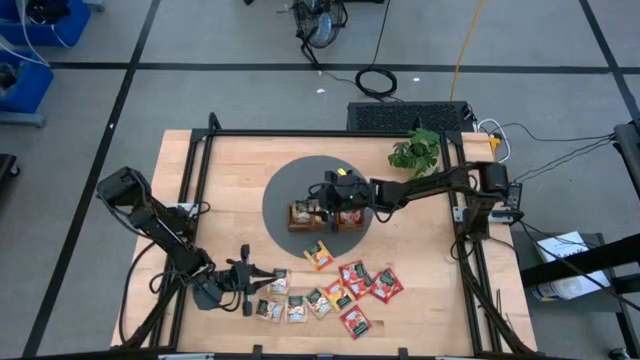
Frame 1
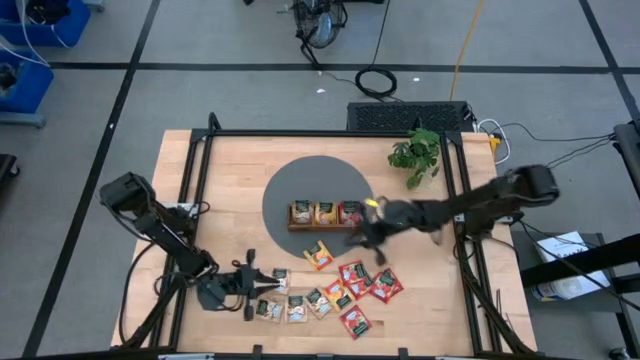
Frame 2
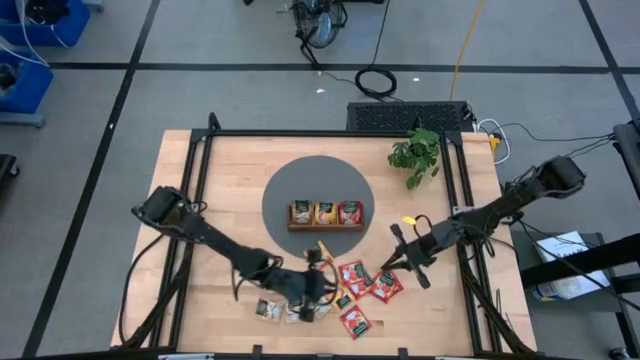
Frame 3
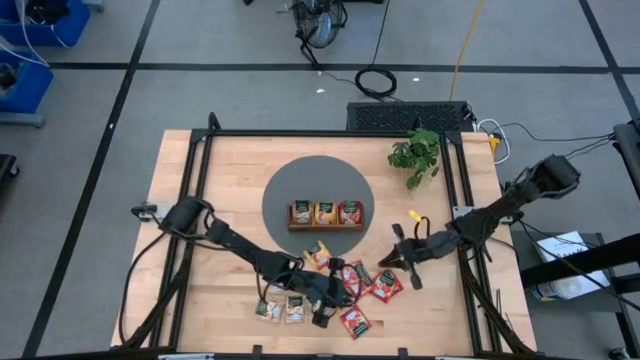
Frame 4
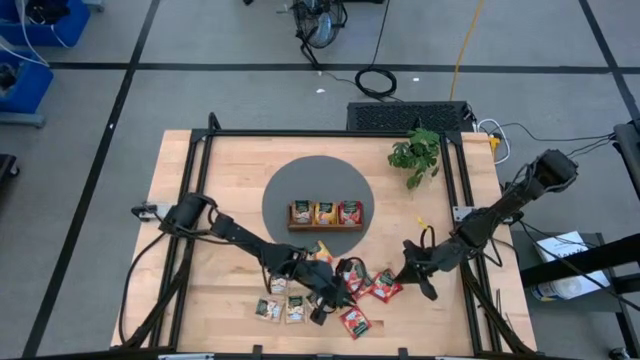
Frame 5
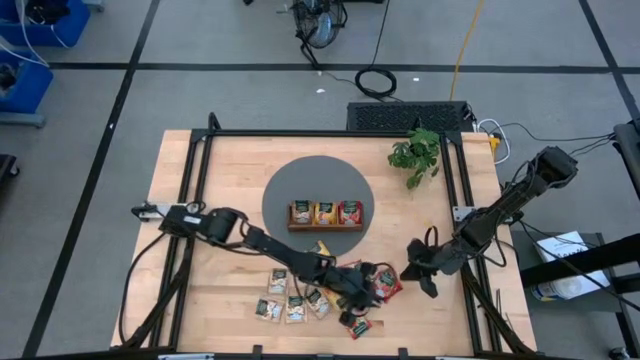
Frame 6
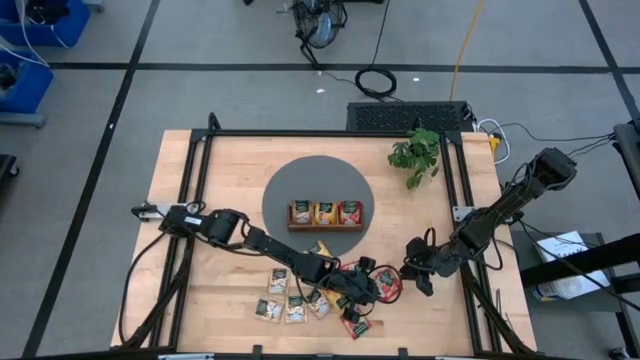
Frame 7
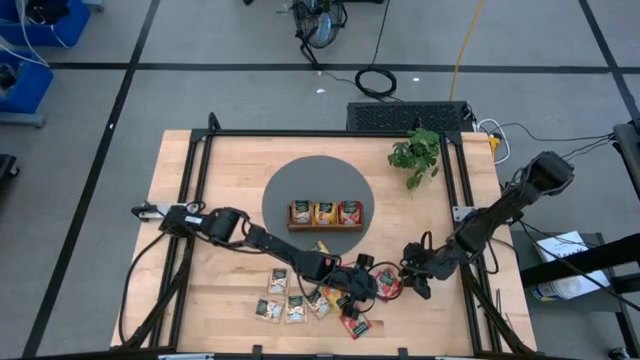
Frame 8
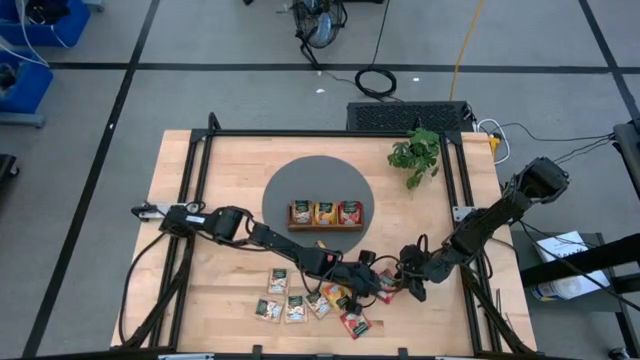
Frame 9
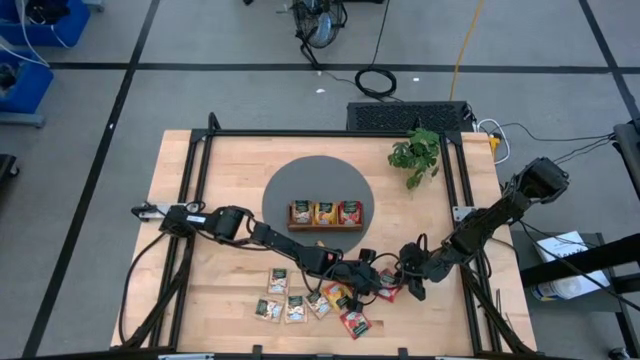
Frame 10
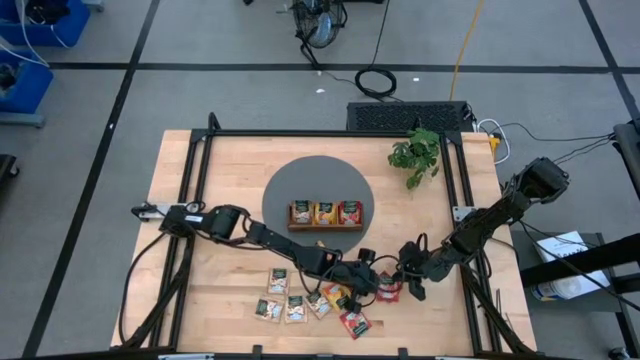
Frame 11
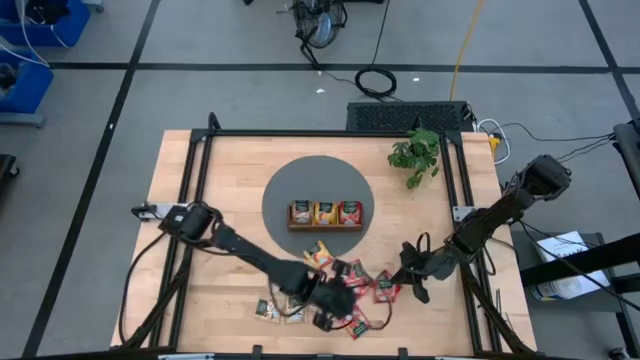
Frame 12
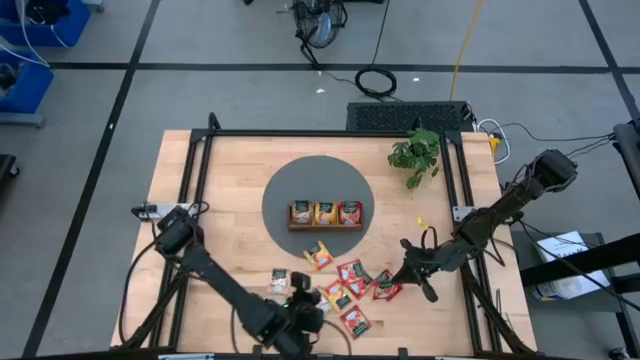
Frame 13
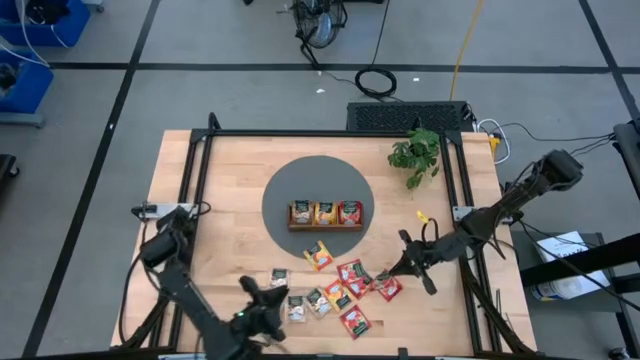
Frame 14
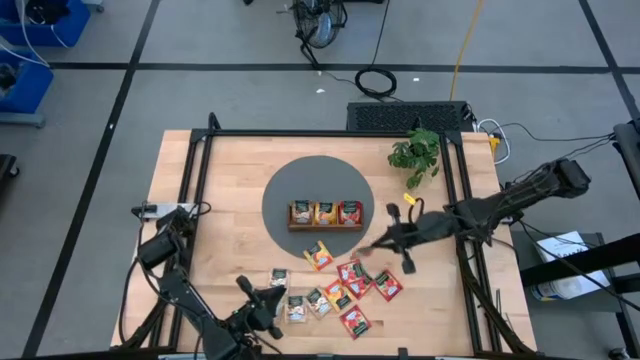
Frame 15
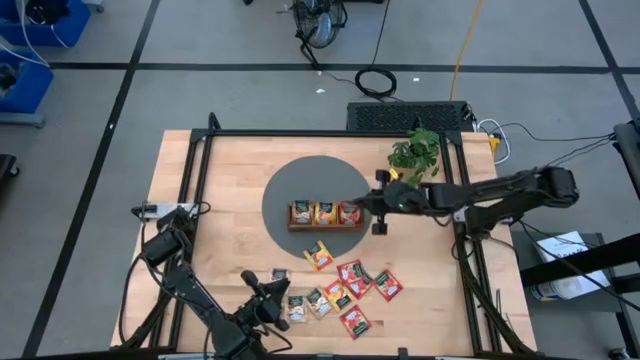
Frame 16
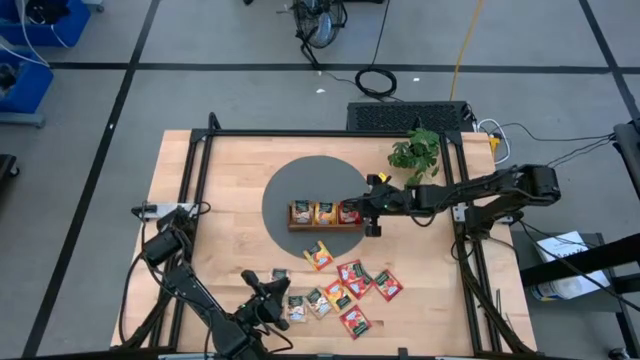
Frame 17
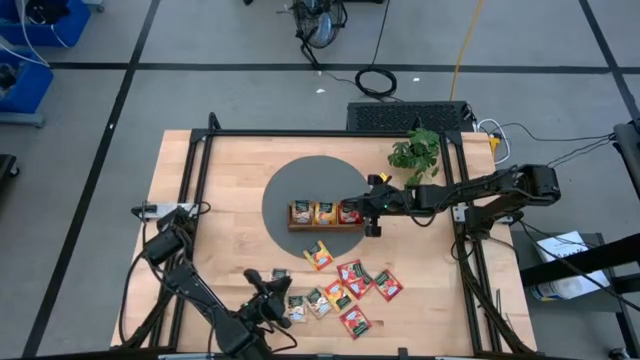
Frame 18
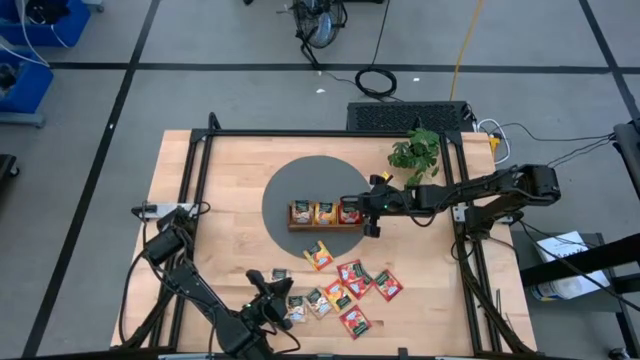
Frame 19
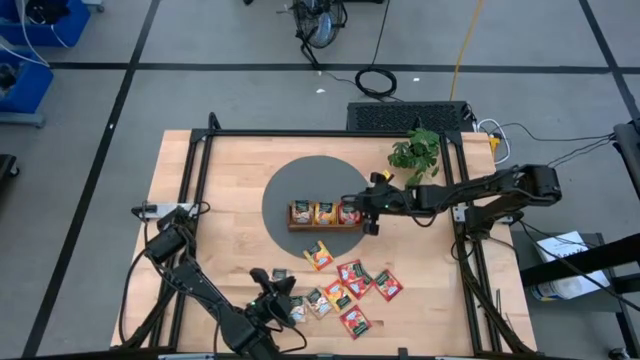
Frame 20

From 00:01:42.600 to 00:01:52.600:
Task: Pick & Place Tea
Put the strawberry tea sachet into the right compartment of the wooden organizer

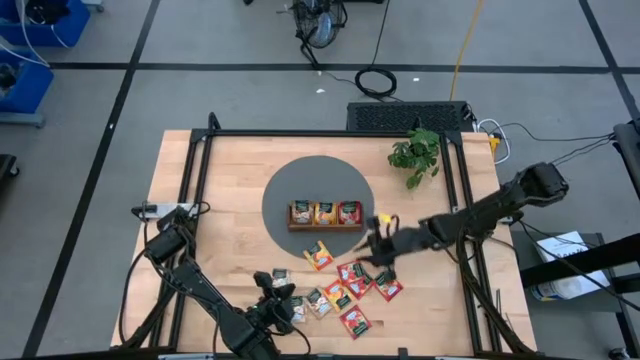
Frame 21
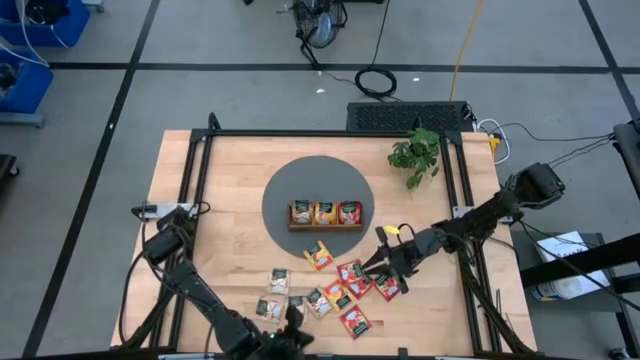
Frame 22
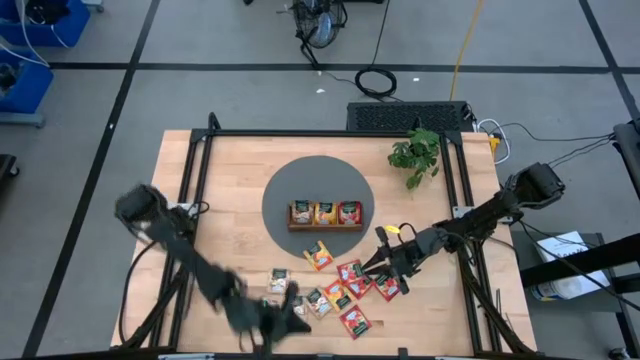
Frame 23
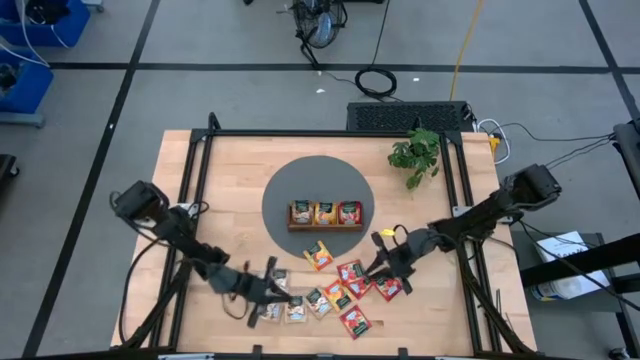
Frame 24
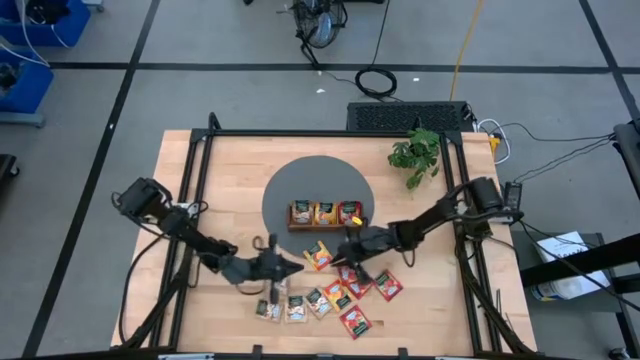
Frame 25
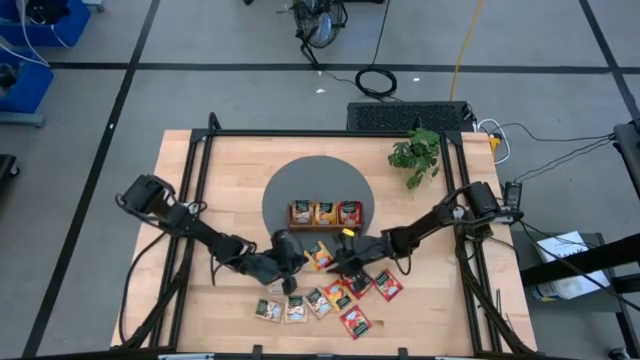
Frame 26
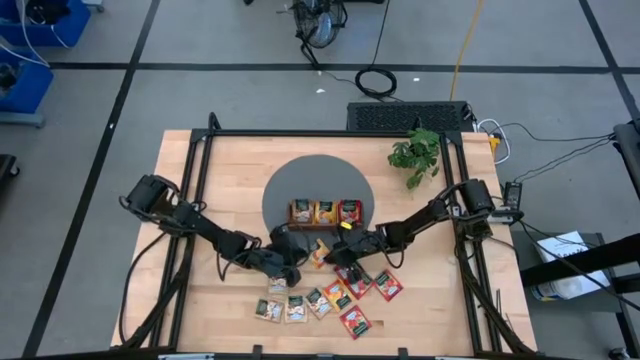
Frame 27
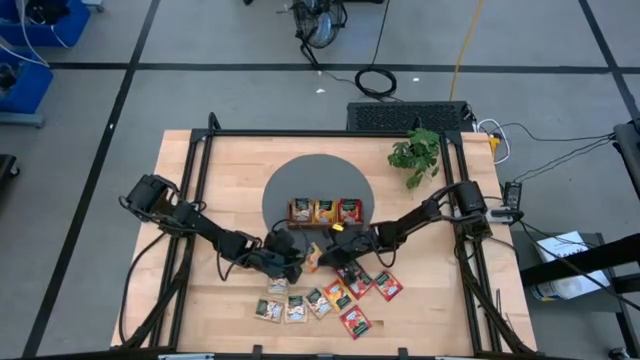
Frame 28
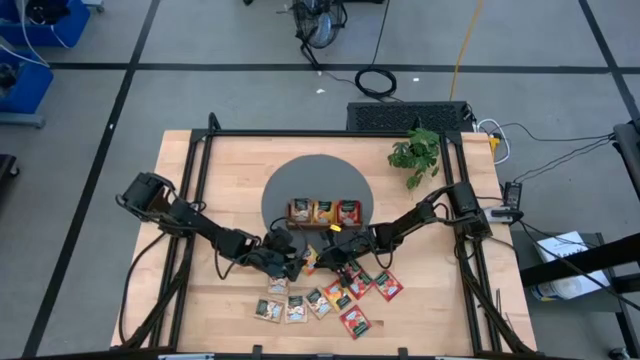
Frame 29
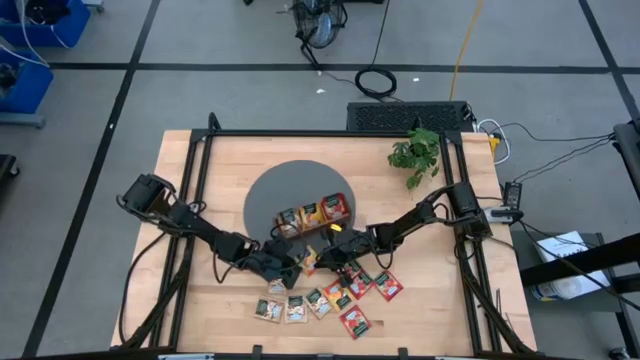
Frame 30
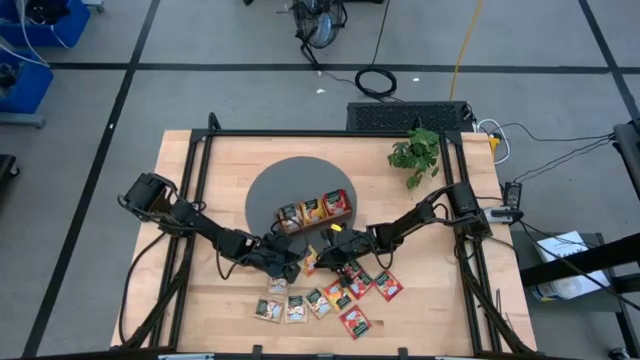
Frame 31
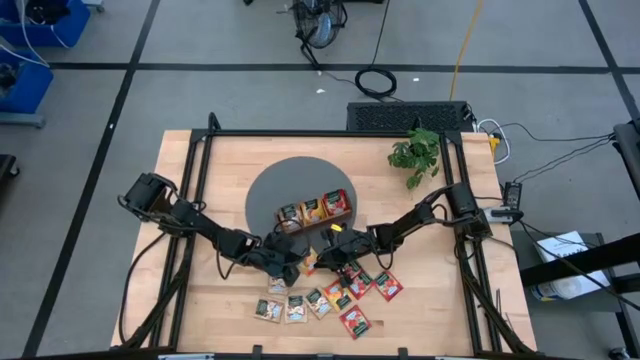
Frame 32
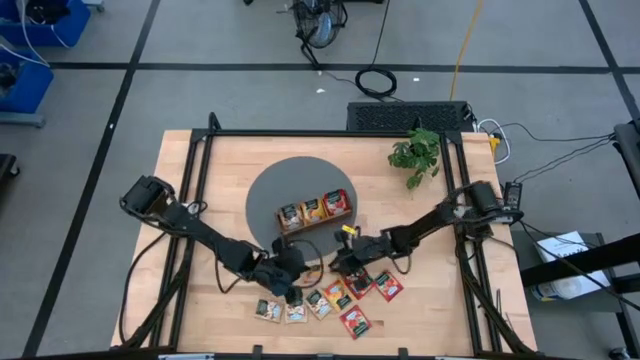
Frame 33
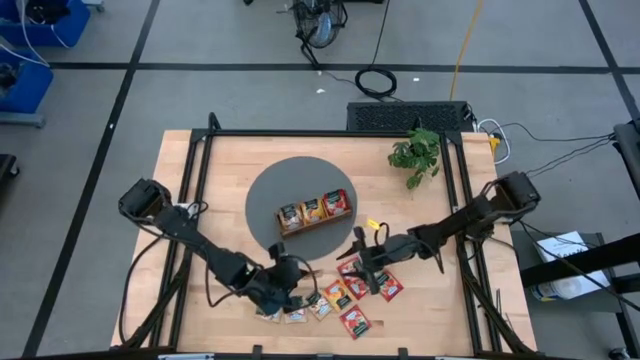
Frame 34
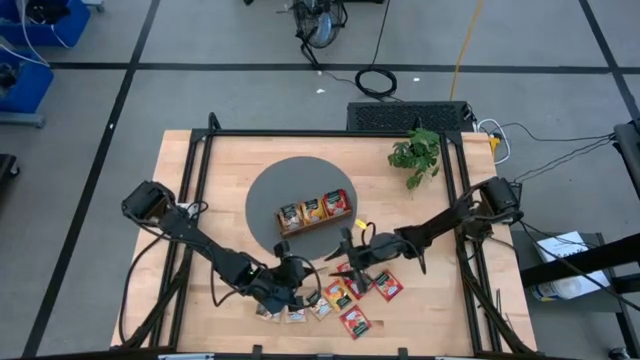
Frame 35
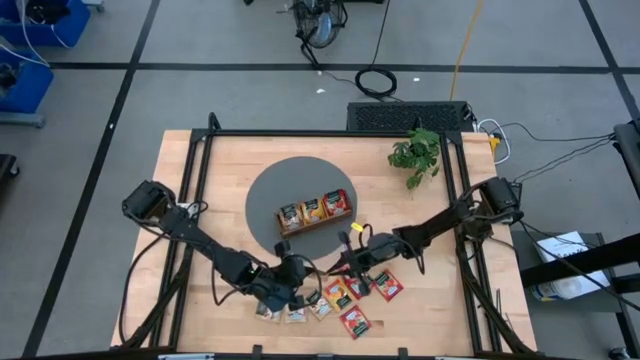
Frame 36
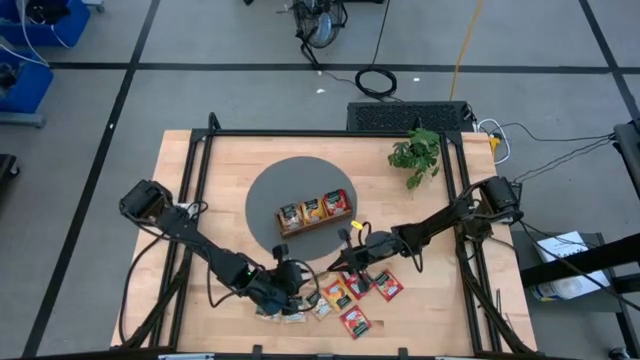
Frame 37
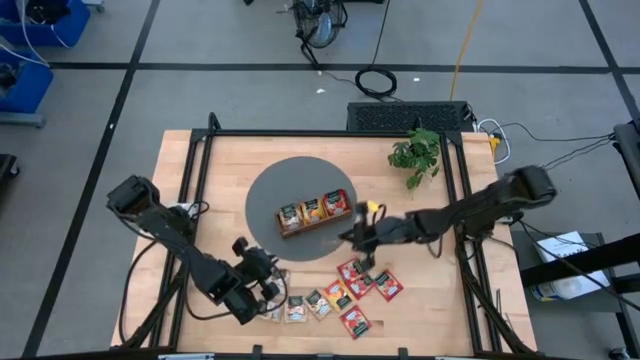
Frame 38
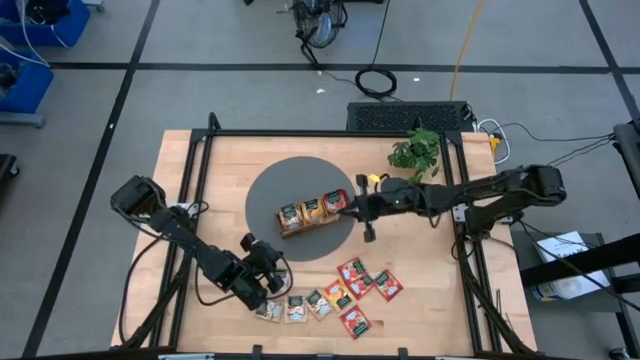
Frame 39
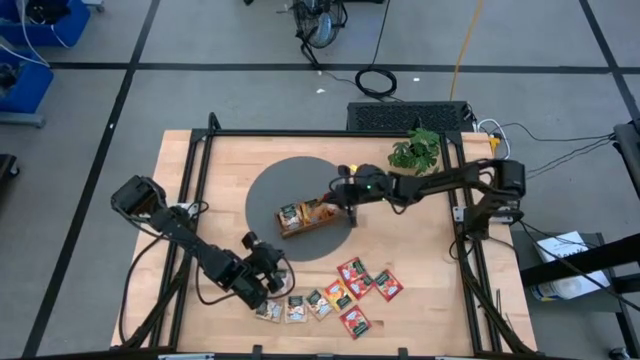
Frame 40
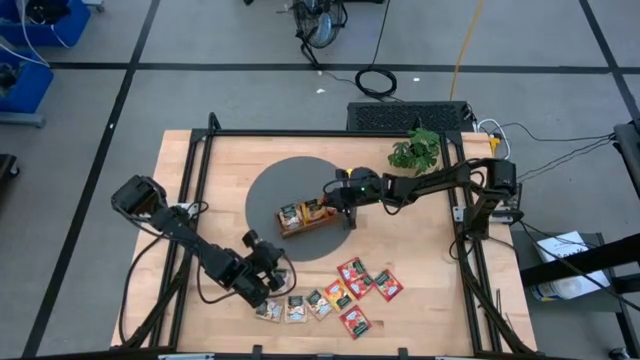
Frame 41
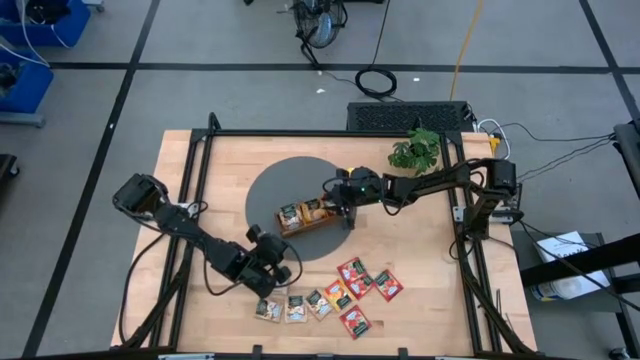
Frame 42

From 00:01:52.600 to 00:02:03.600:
Put the mango tea sachet into the middle compartment of the wooden organizer

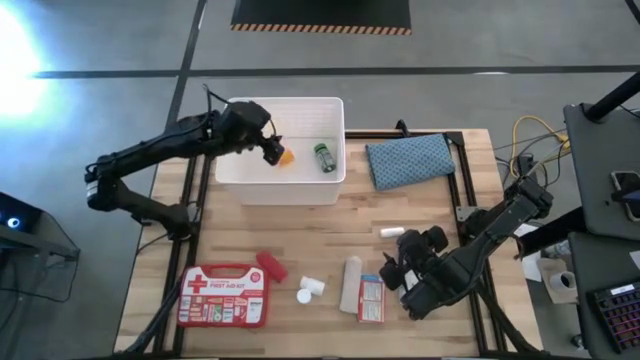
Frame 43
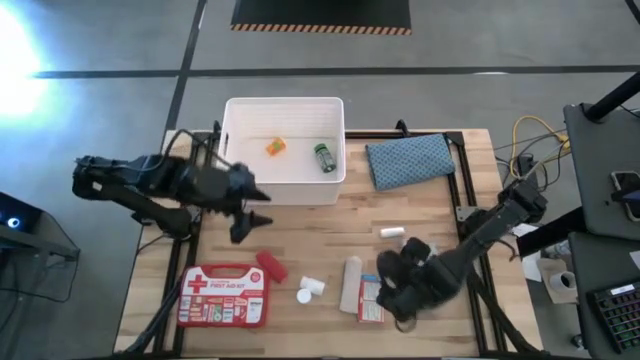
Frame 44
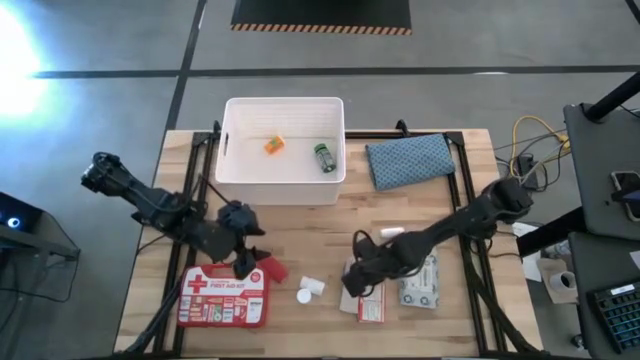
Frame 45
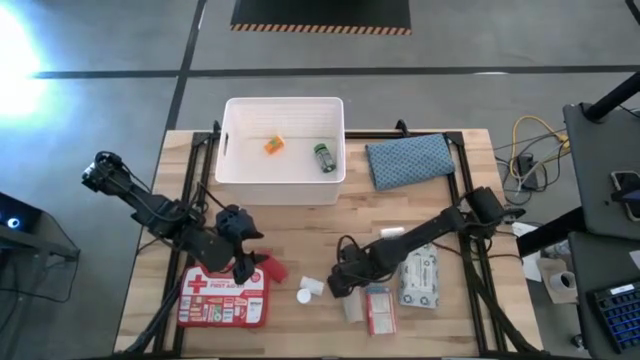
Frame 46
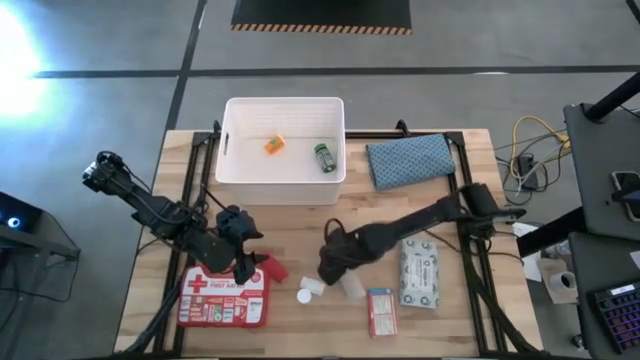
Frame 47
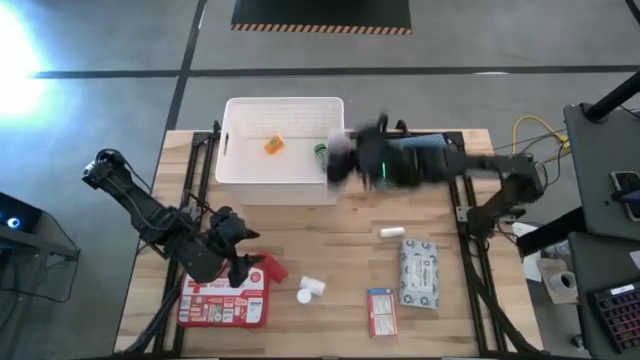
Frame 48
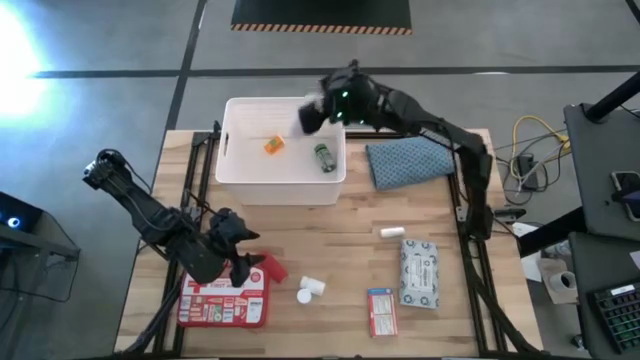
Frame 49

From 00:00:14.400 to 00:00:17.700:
Task: Pick & place medical supplies in basket/bin
Put the white bandage into the white bin
